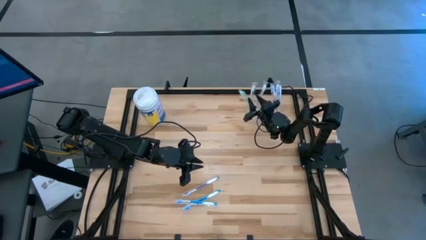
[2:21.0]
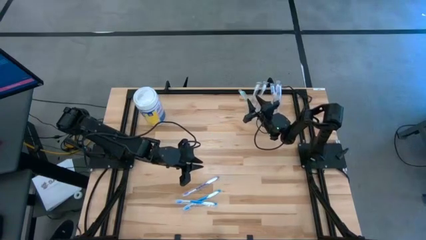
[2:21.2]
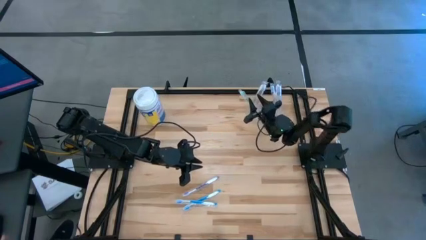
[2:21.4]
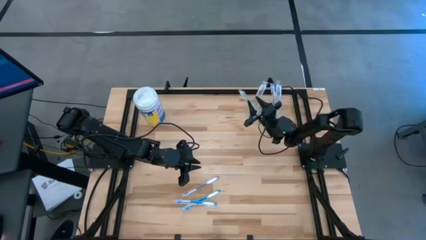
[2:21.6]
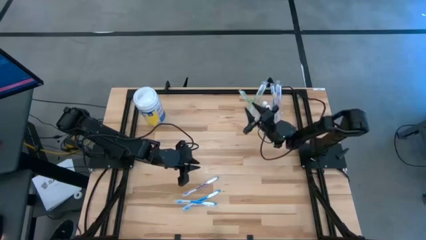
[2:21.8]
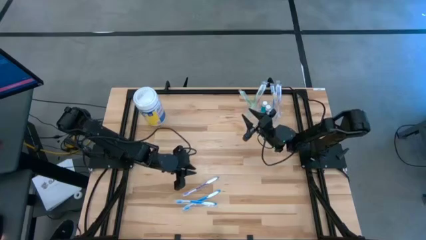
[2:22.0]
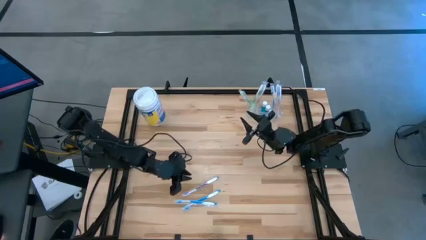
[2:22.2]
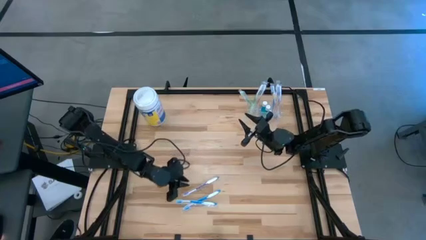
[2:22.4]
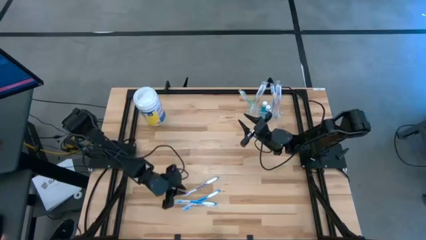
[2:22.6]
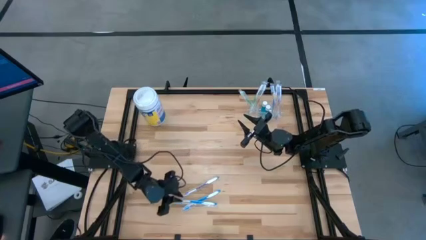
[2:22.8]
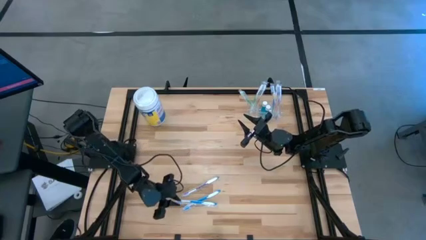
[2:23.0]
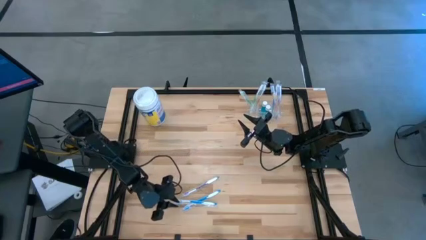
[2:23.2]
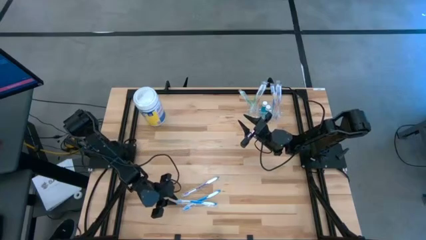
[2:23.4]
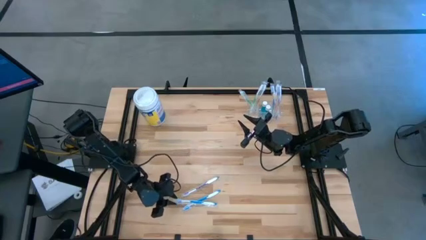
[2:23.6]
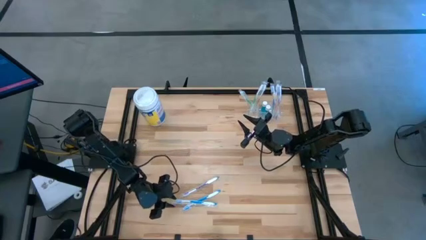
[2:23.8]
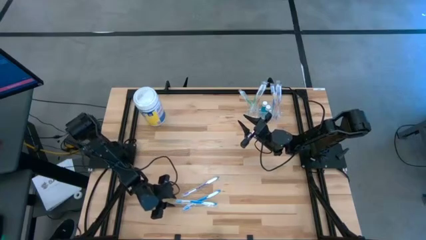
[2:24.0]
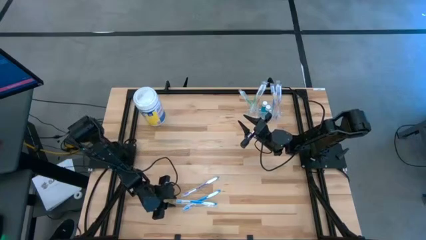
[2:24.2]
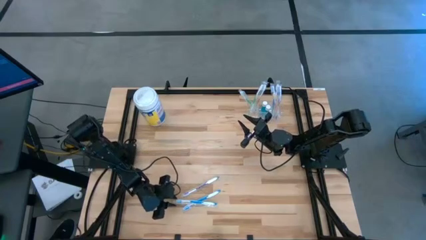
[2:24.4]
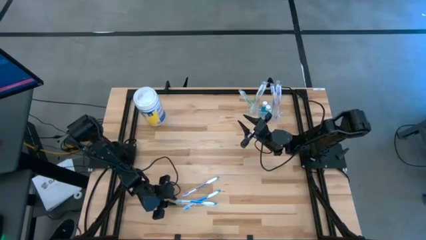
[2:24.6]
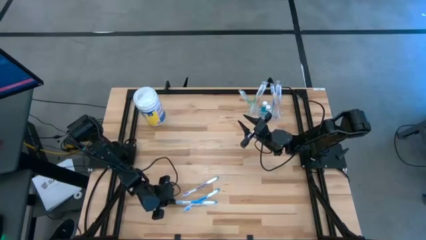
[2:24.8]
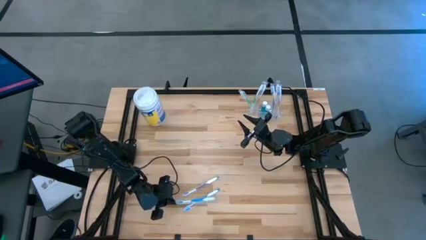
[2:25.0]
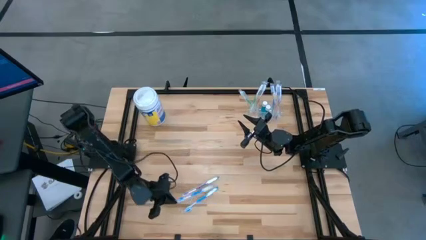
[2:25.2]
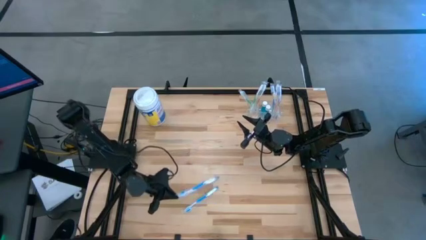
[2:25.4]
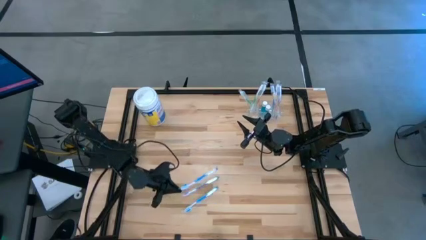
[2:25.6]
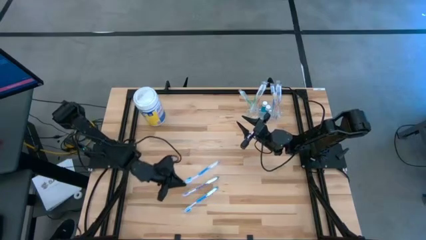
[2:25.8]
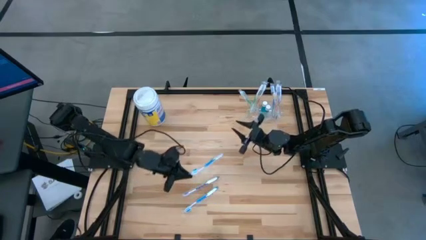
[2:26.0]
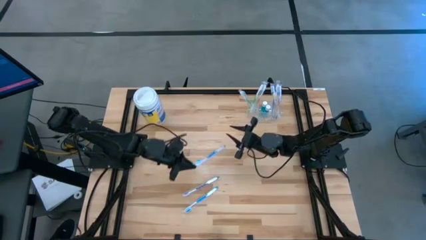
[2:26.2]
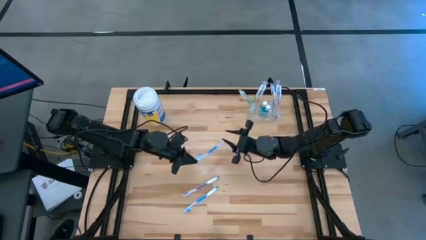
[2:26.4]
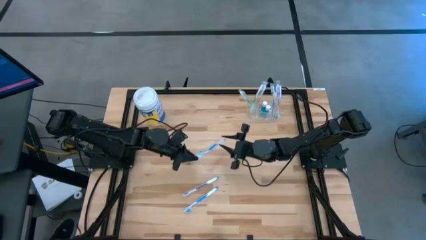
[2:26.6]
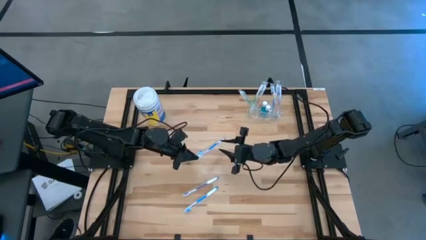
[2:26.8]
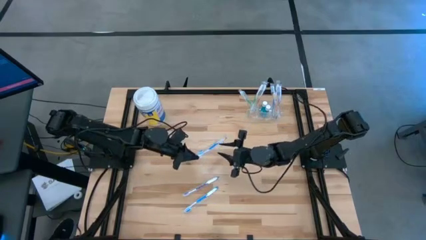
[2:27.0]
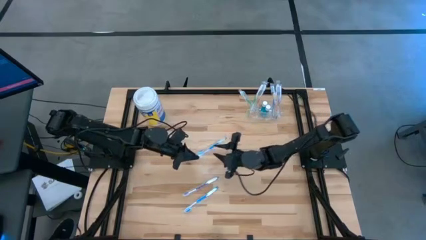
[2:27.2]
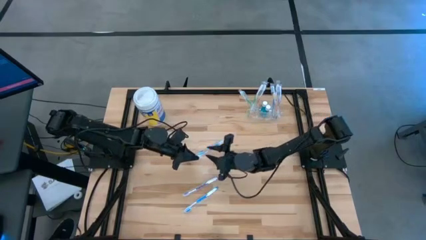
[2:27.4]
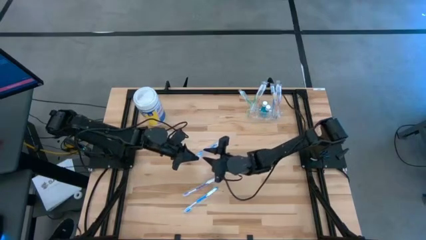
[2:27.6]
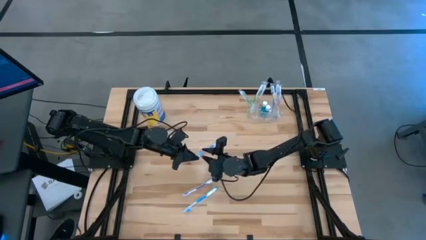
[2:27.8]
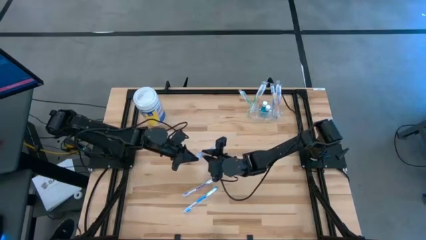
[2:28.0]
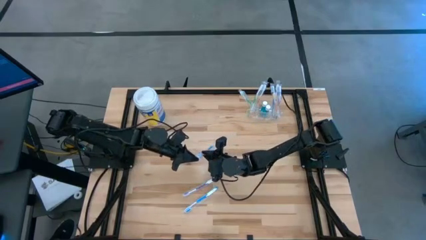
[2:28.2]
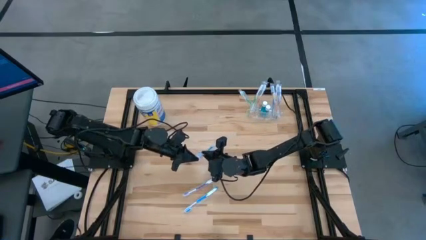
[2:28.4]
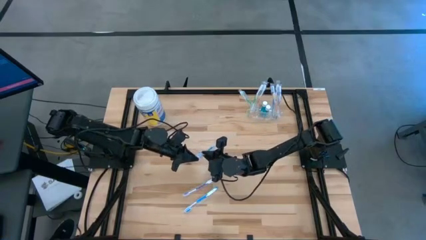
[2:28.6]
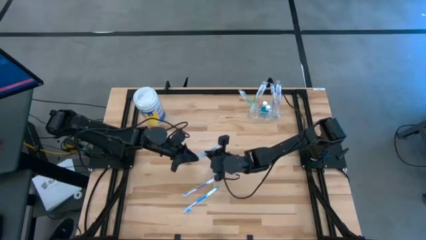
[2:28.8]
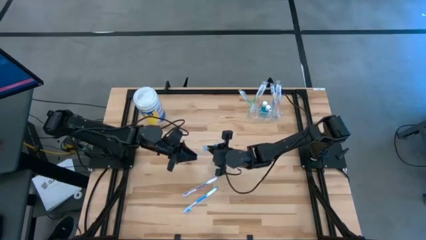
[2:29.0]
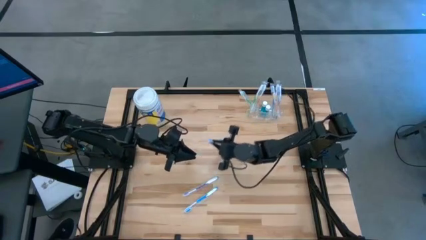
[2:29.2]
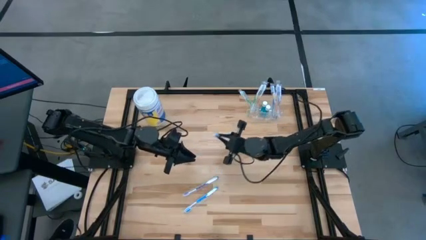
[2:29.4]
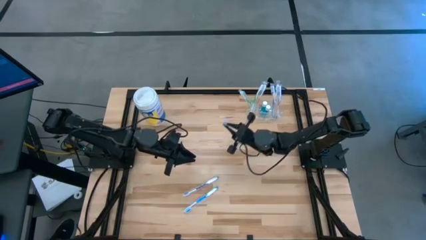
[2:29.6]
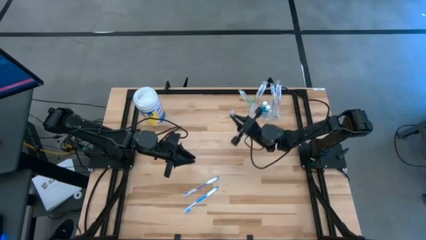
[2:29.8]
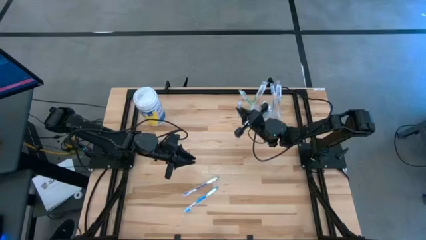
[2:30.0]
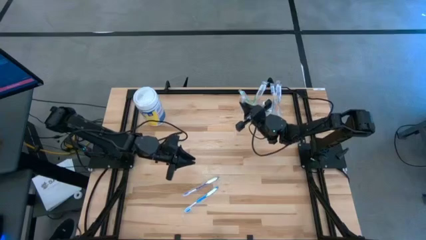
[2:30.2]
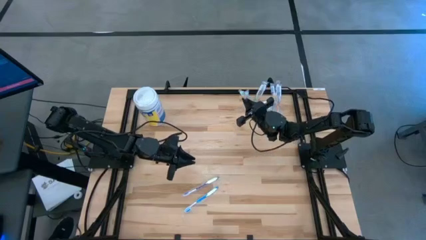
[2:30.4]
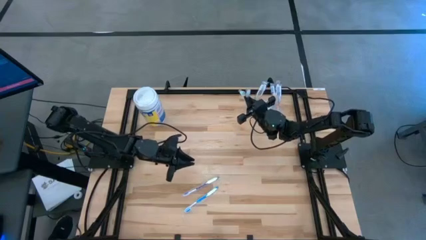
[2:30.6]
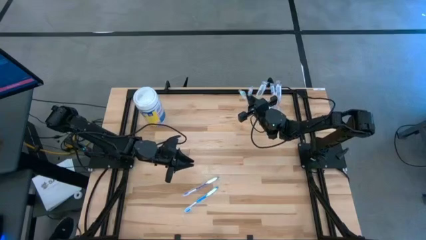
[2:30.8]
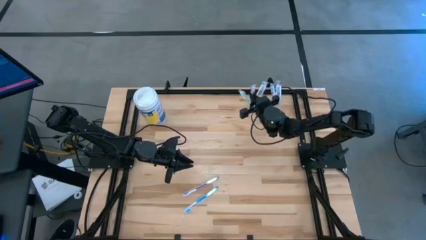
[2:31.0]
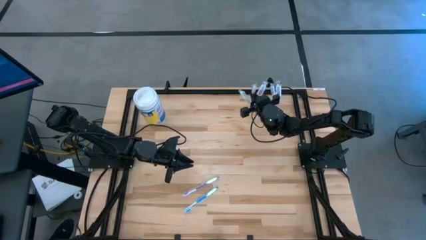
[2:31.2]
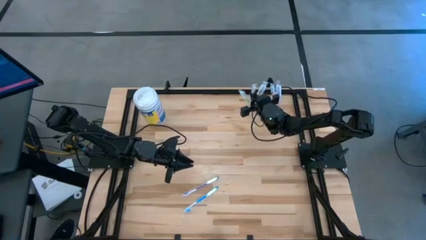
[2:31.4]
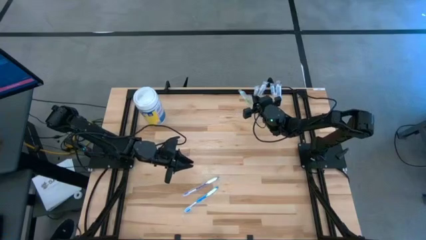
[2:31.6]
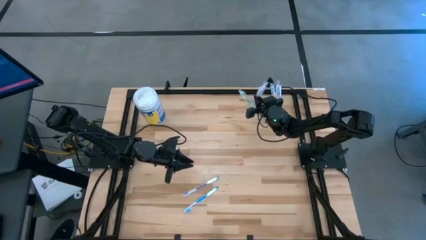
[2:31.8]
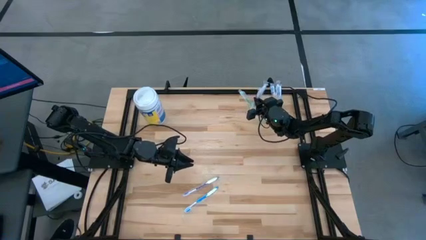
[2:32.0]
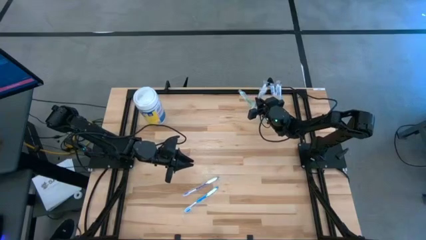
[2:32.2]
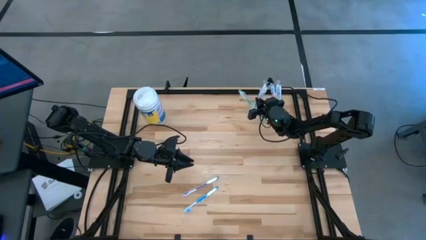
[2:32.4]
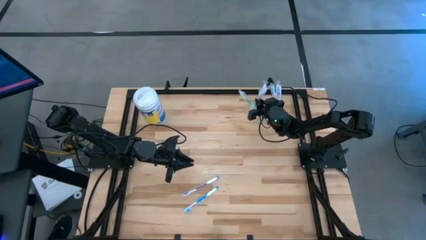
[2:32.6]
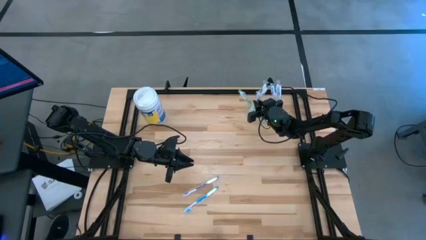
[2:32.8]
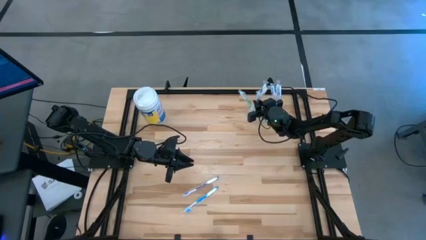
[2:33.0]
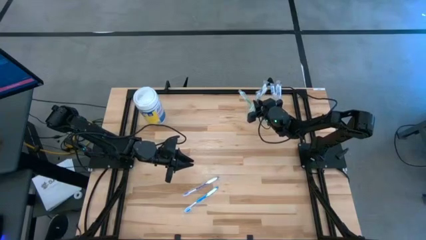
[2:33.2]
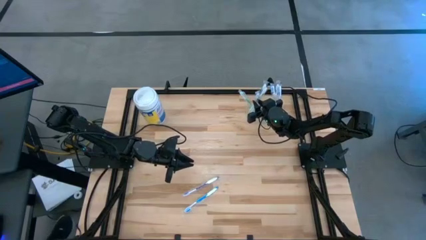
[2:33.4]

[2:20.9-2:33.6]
Task: Pick & Place toothbrushing station
Put the top blue toothbrush into the left transparent organizer

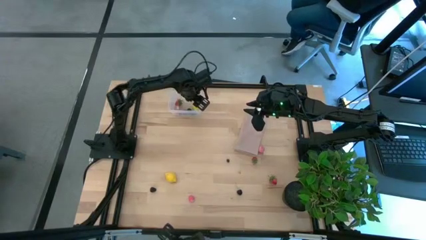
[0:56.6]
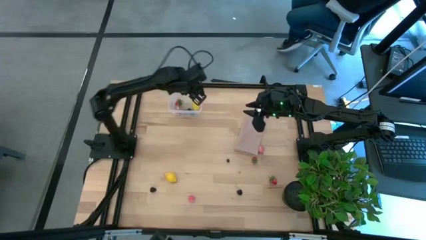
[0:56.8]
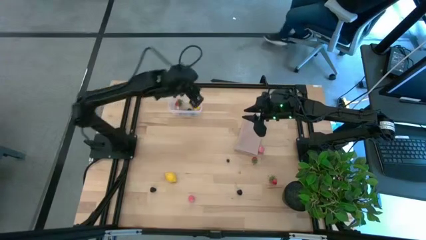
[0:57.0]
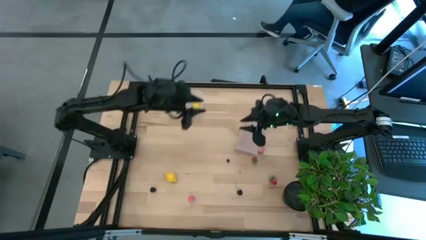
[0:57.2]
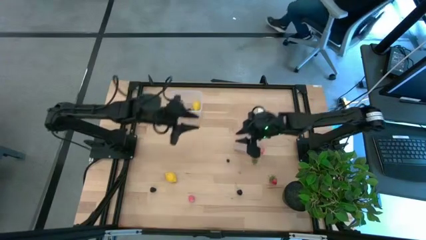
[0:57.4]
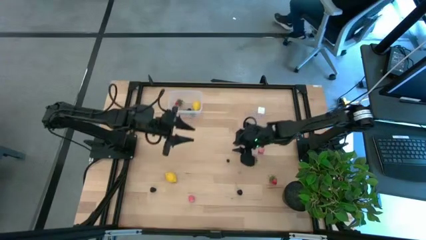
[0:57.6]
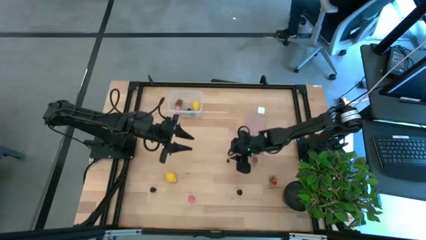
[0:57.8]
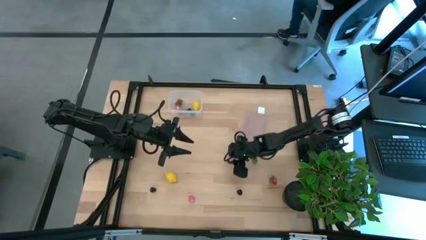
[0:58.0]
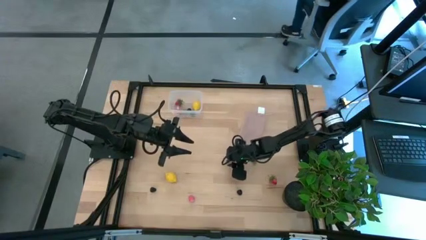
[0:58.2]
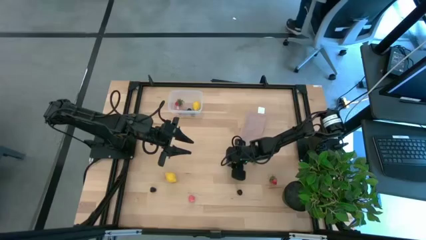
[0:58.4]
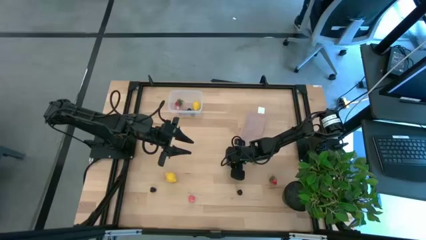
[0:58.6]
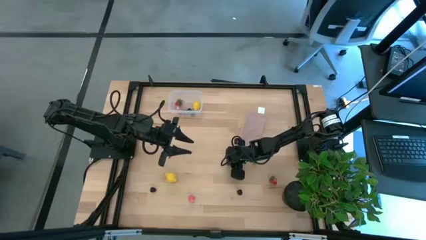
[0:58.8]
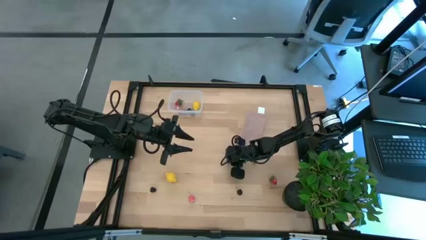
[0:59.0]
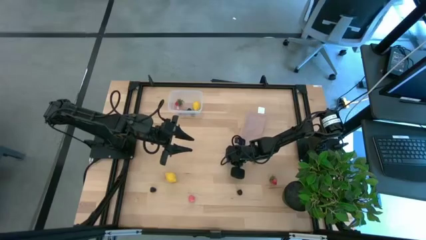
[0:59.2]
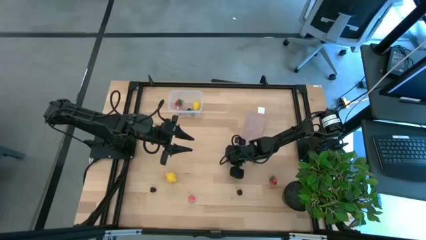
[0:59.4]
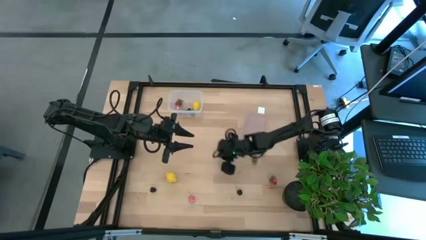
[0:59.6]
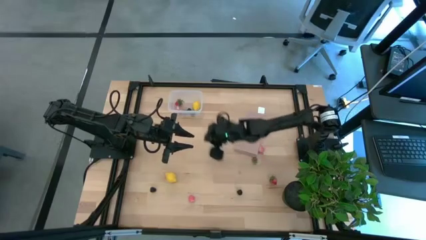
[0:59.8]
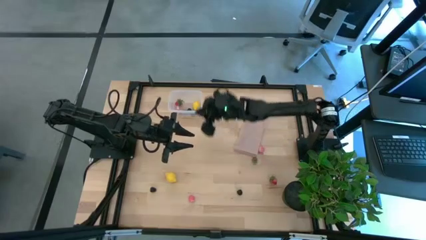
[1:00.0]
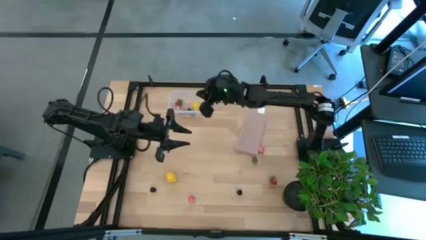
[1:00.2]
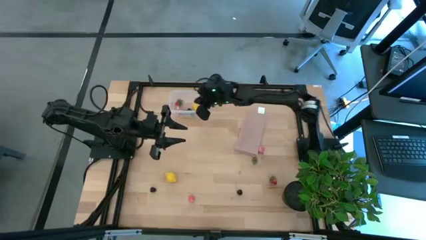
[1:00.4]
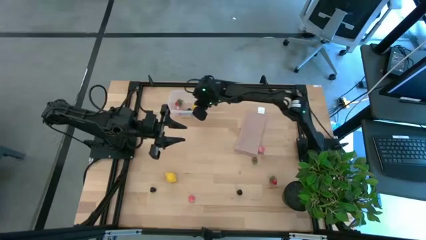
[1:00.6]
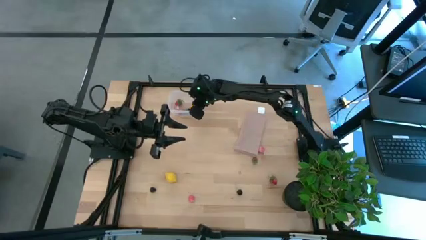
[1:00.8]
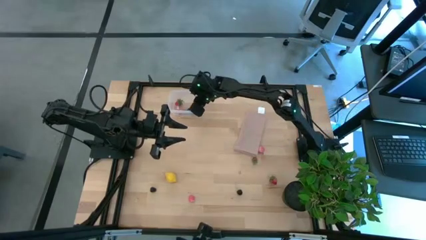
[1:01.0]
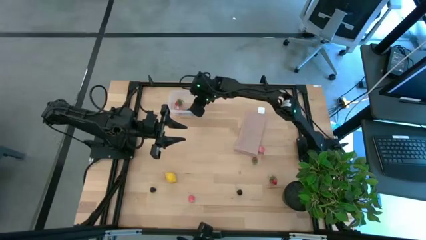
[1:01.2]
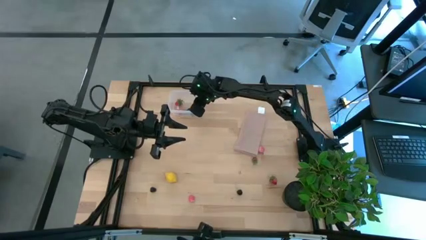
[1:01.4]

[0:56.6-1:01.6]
Task: Pick and placing Produce into tupperware
Put the blueberry into the transparent bin
